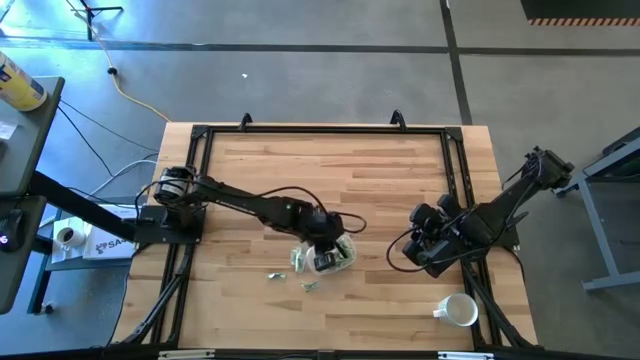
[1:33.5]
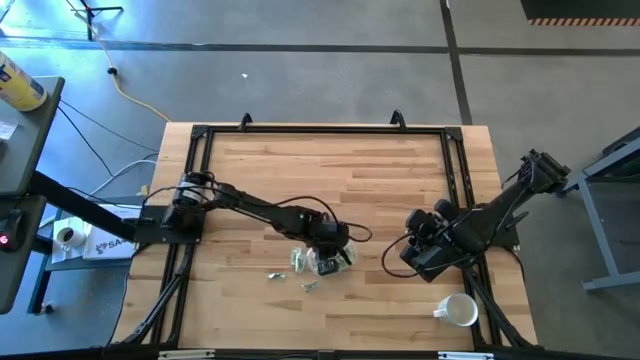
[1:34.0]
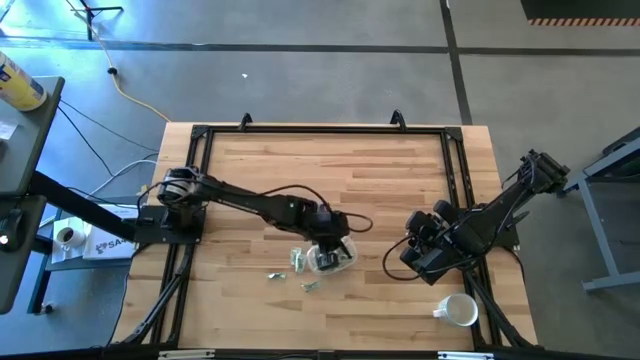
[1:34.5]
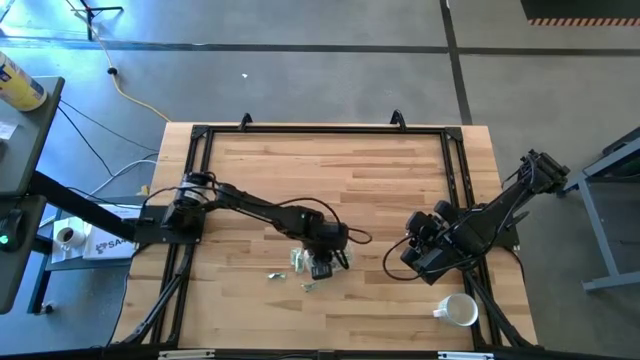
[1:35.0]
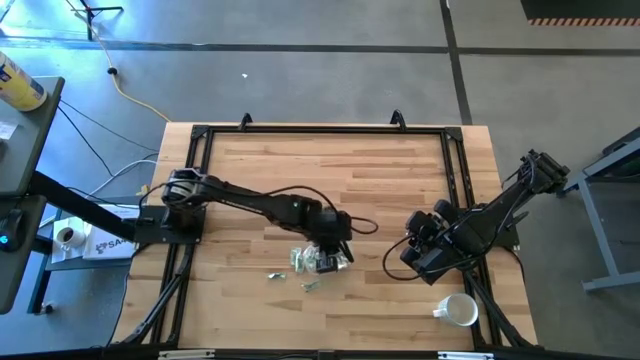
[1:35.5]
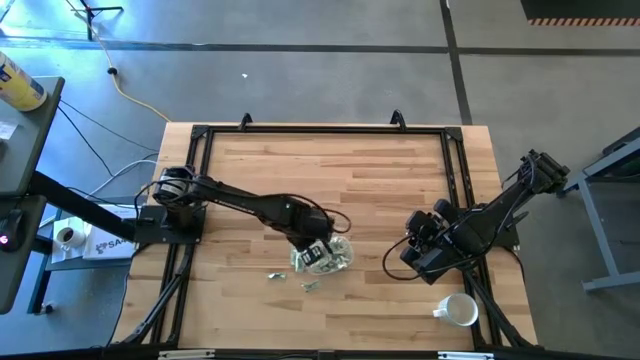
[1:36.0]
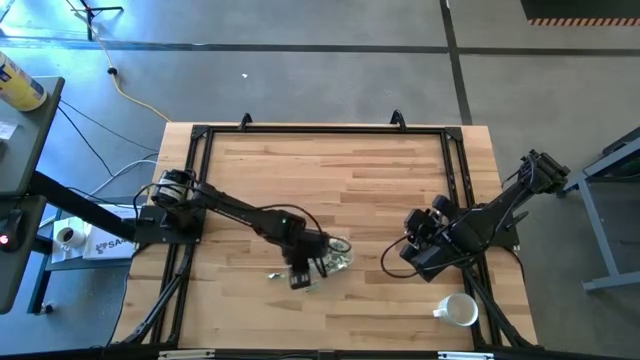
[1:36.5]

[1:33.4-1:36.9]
Task: Pick and place Stevia / Truvia into bins
Adjust the transparent bin

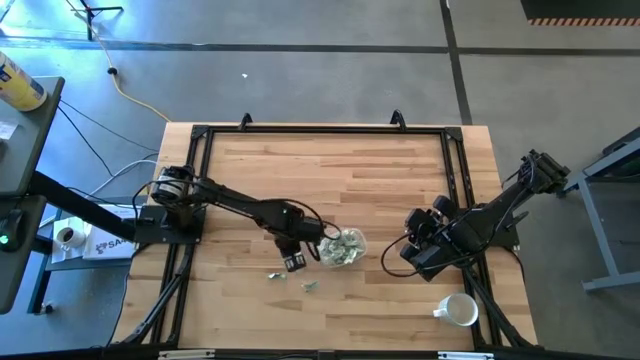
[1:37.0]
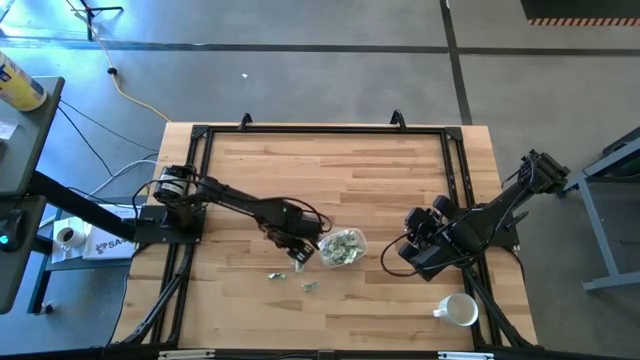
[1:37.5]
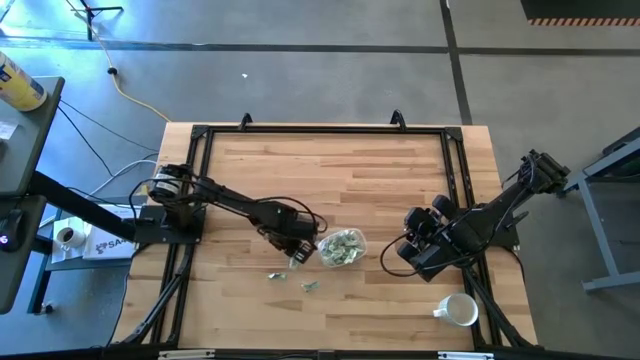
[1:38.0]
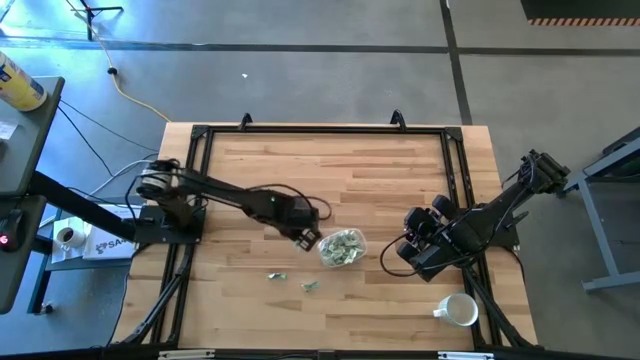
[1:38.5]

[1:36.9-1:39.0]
Put the stevia packet into the transparent bin

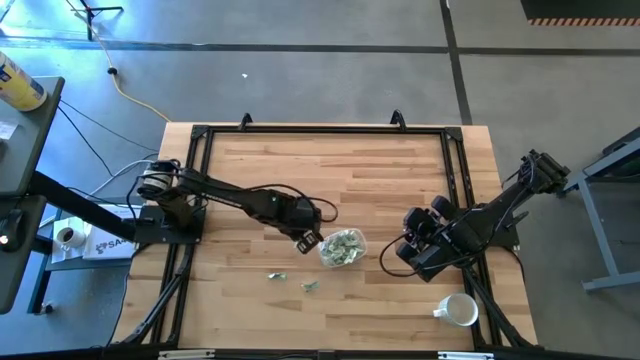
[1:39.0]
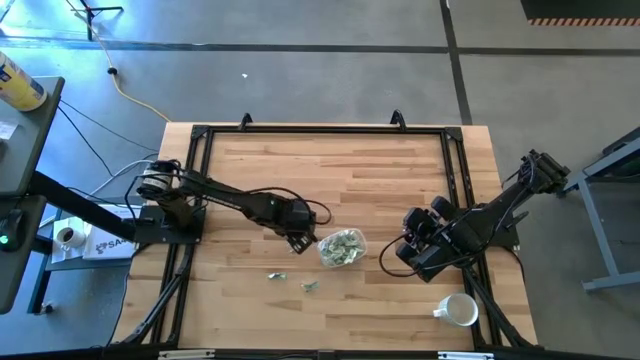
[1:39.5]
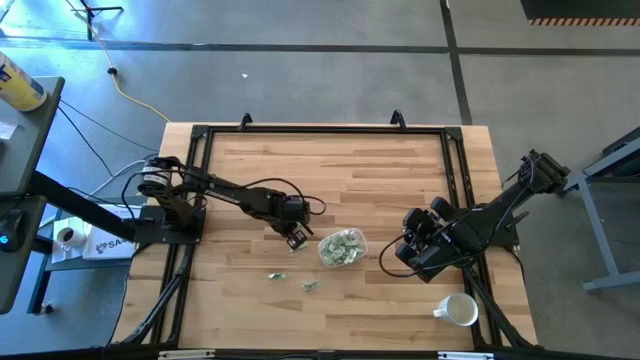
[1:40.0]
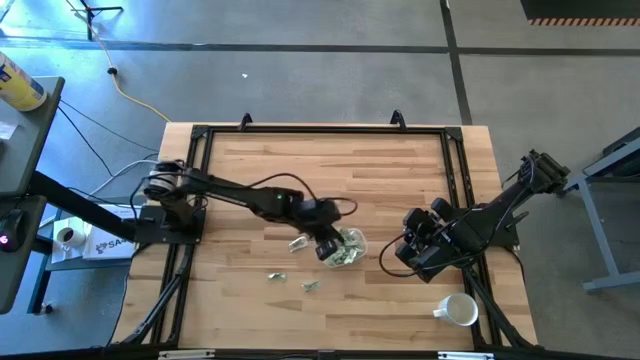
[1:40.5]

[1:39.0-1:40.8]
Put the stevia packet into the transparent bin

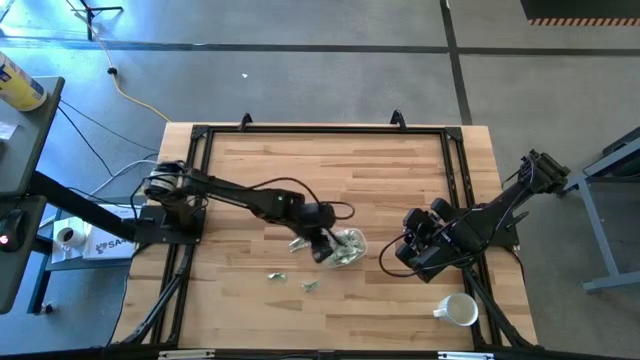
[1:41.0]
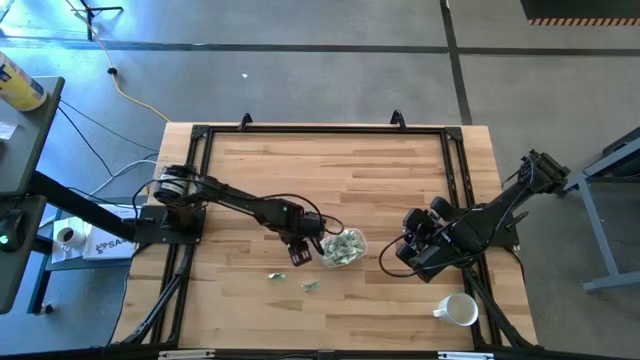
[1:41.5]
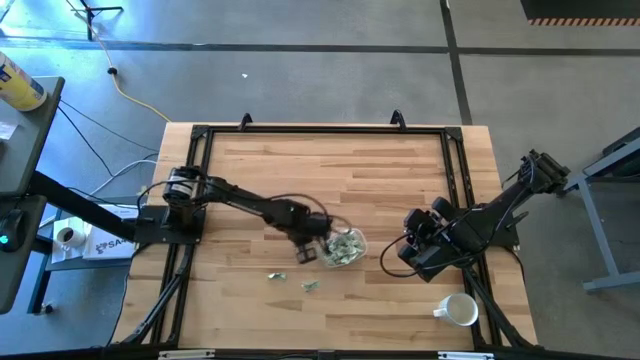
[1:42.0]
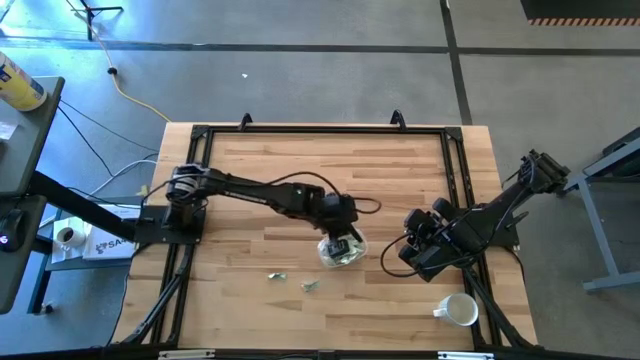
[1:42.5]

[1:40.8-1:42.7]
Put the stevia packet into the transparent bin

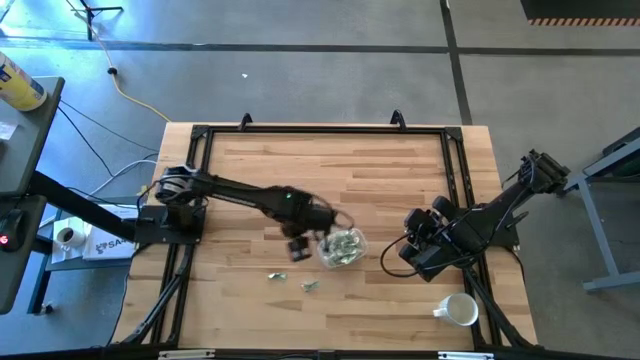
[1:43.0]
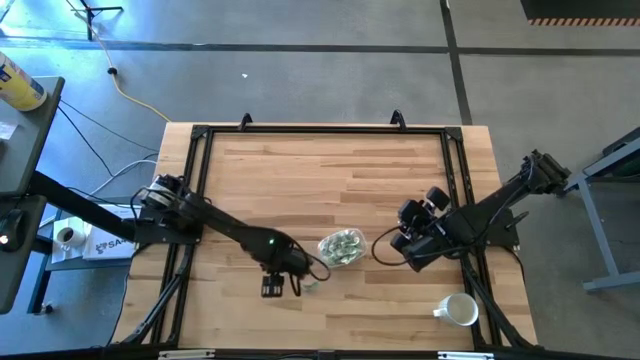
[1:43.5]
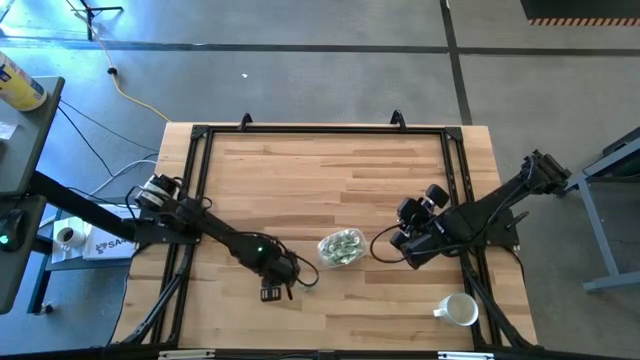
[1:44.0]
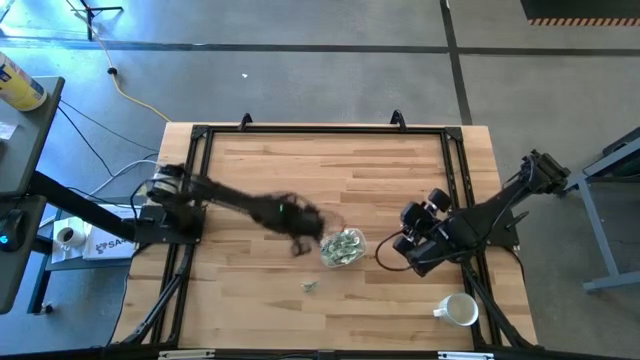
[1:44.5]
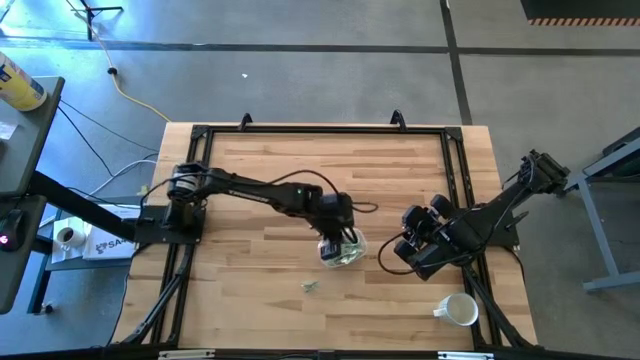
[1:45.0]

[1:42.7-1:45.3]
Put the stevia packet into the transparent bin

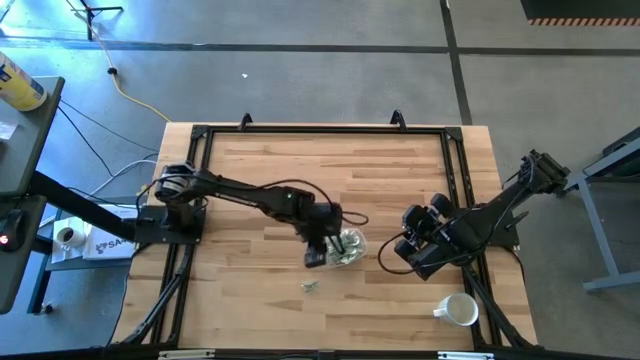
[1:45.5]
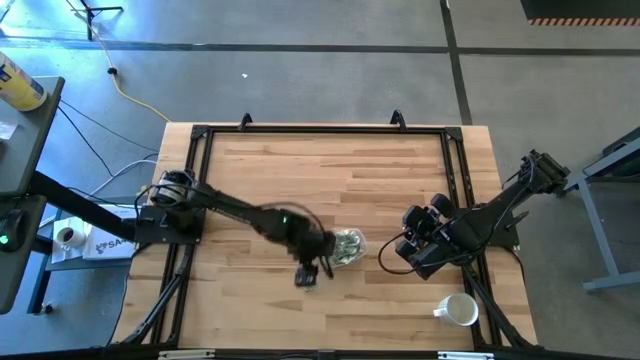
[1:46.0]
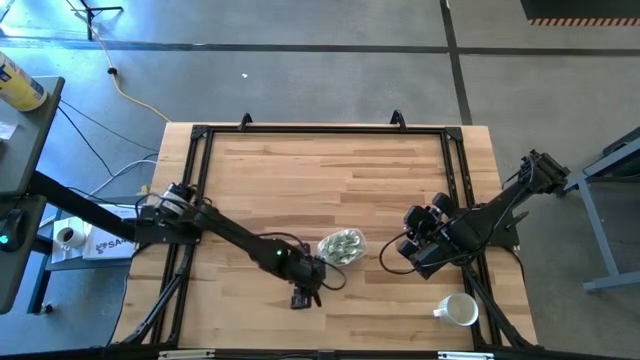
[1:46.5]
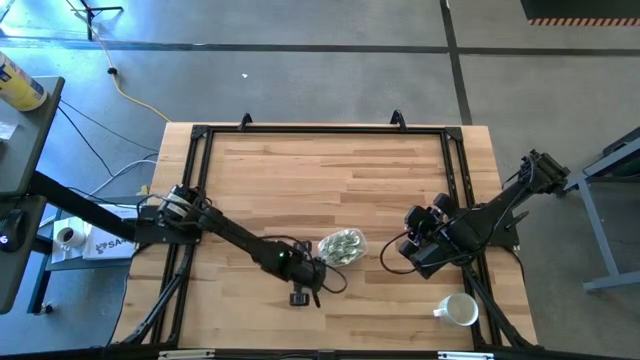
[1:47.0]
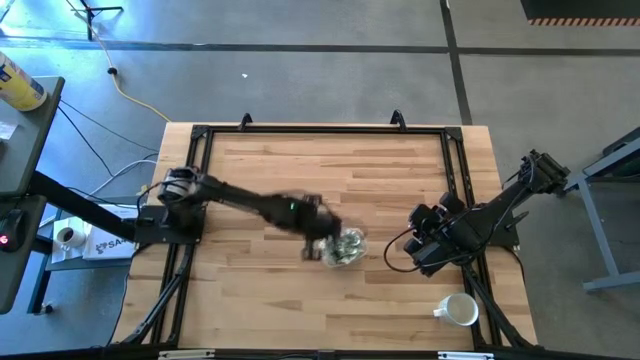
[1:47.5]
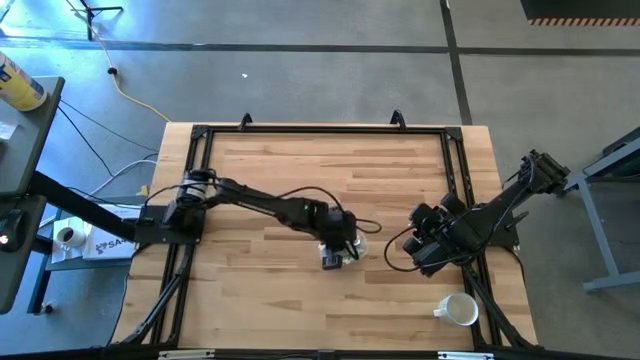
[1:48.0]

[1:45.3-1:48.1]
Put the stevia packet into the transparent bin

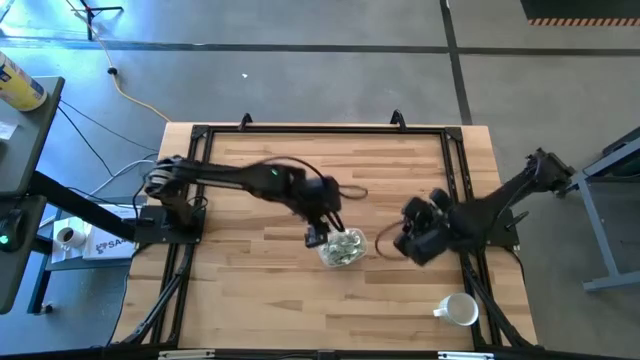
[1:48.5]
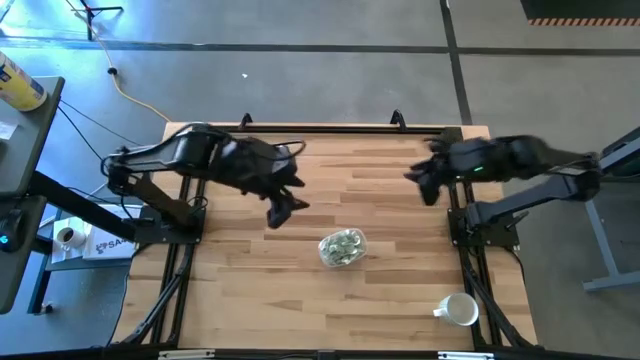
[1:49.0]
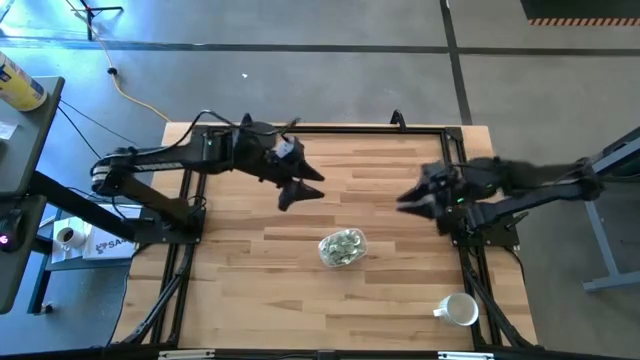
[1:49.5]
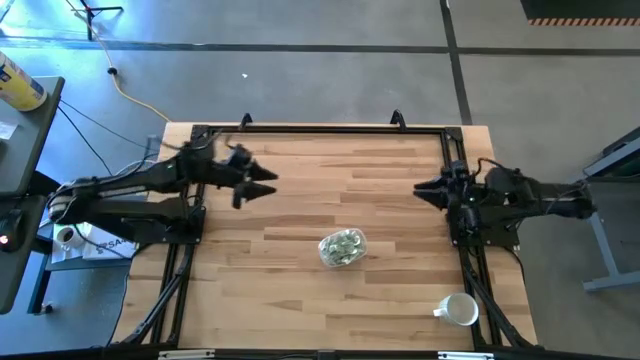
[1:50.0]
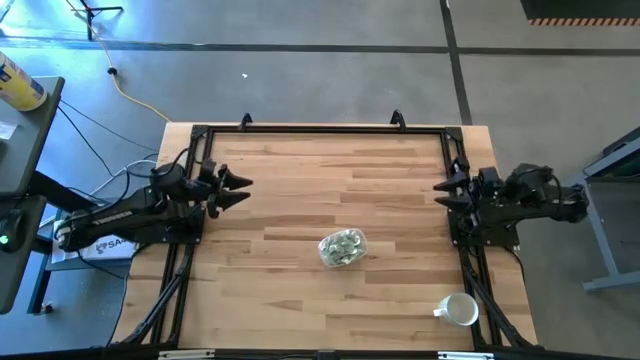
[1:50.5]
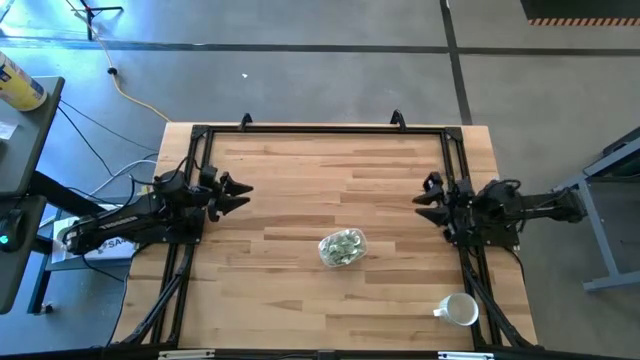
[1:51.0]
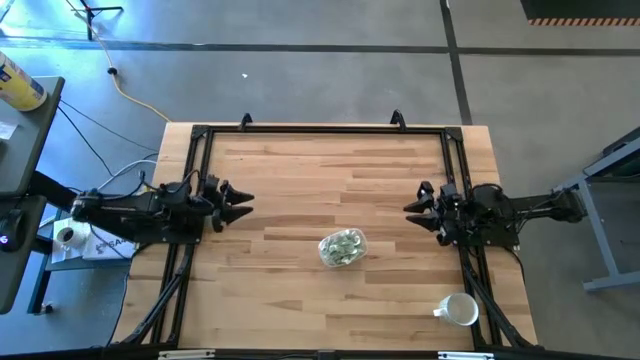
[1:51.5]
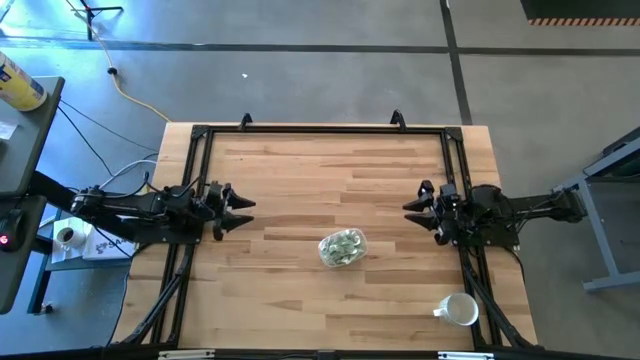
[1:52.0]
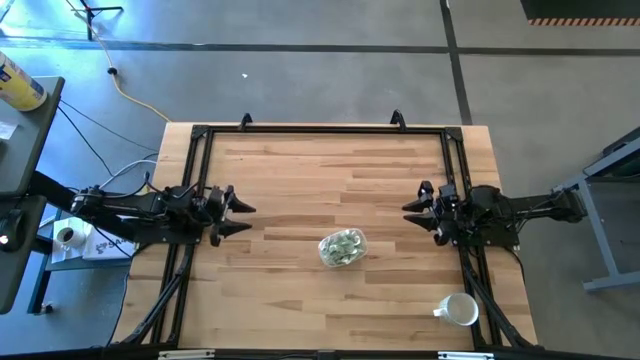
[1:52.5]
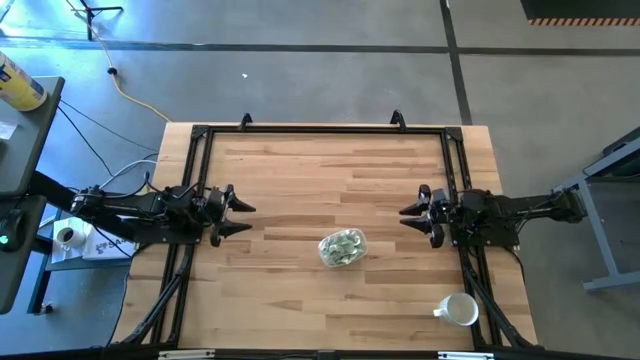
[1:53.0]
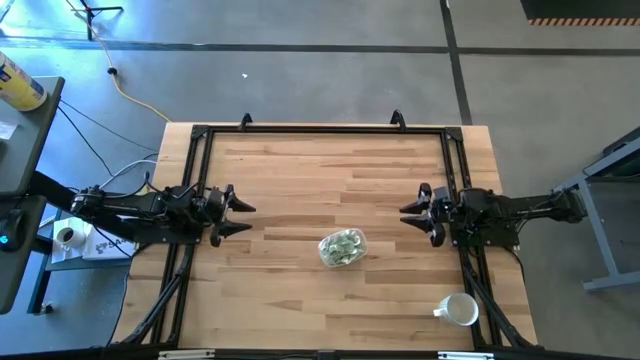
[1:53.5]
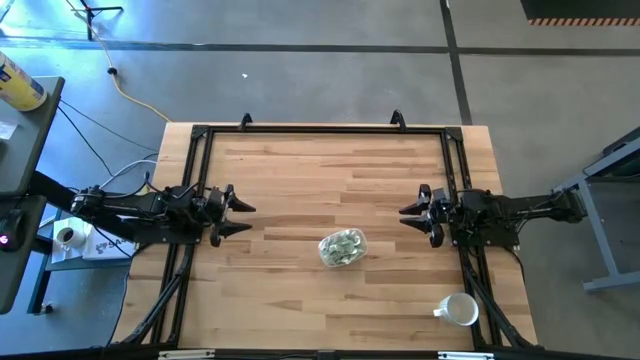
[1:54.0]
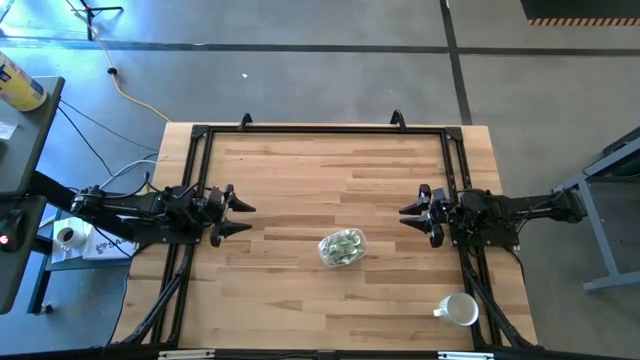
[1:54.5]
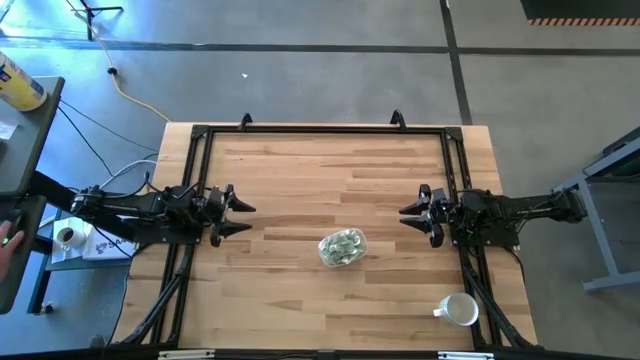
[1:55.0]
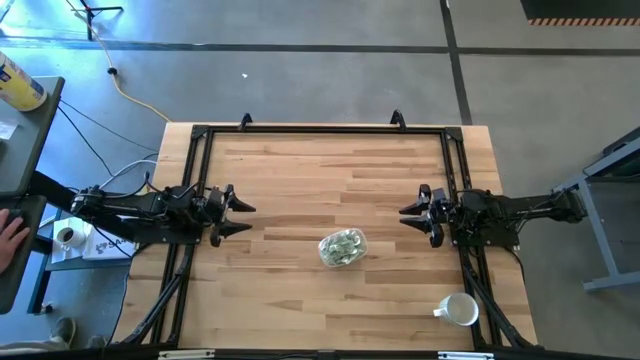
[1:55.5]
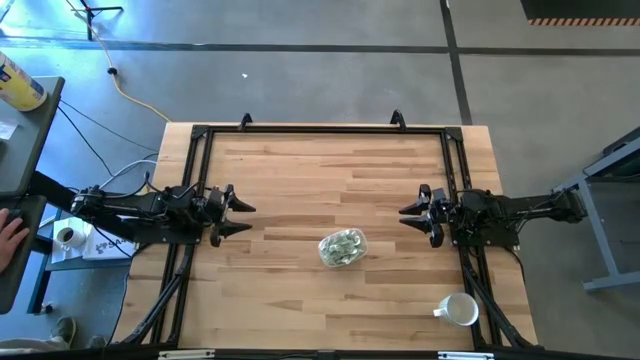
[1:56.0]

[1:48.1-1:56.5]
Return to Home Position
